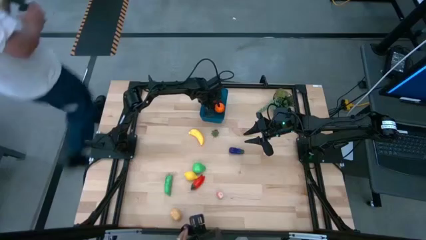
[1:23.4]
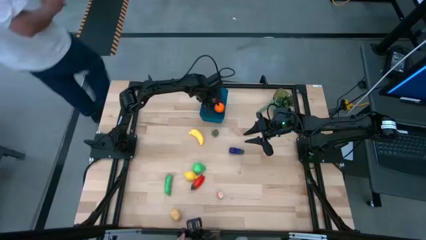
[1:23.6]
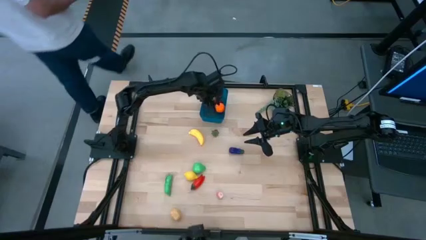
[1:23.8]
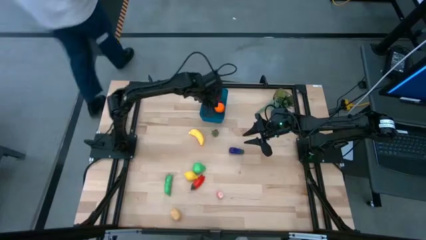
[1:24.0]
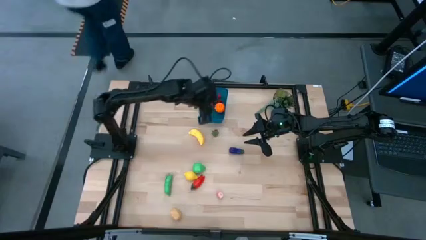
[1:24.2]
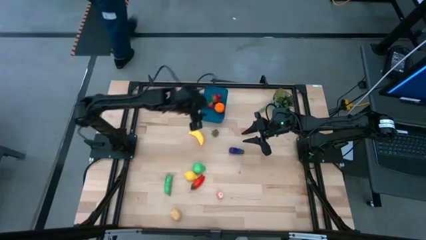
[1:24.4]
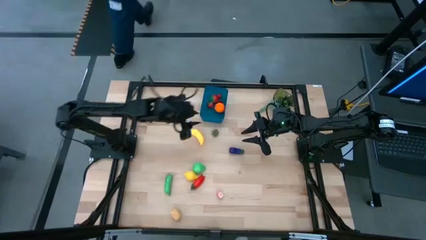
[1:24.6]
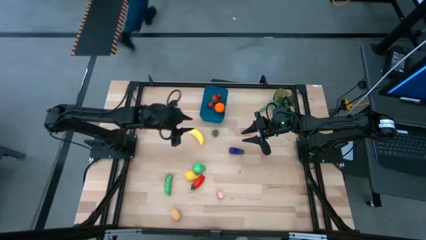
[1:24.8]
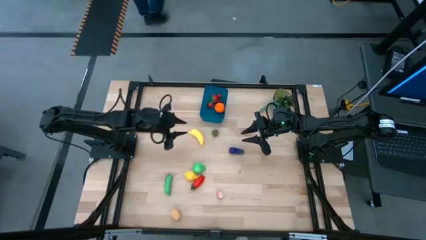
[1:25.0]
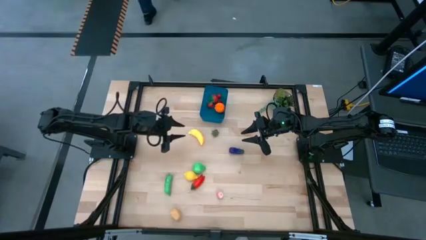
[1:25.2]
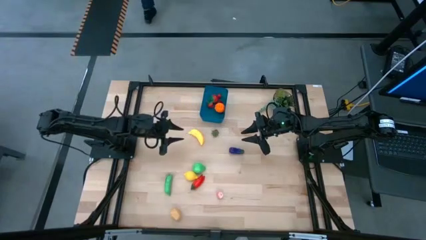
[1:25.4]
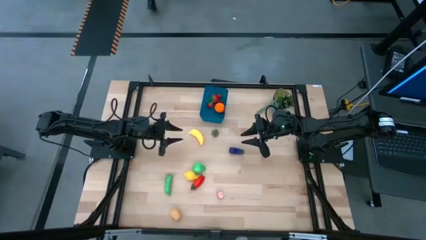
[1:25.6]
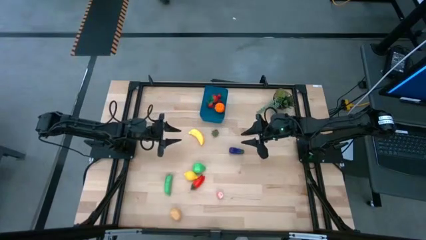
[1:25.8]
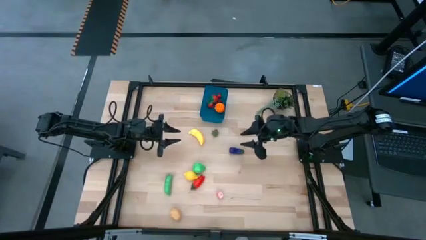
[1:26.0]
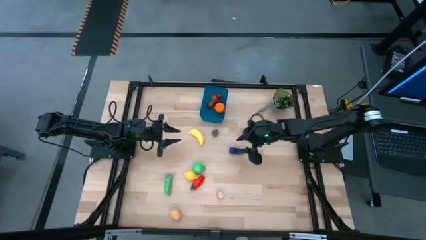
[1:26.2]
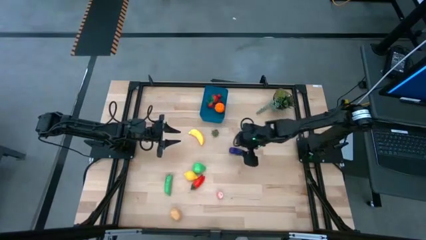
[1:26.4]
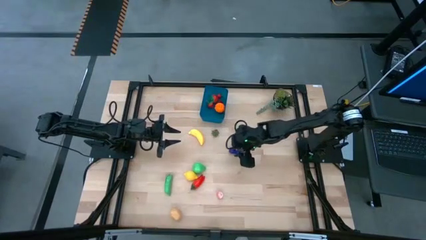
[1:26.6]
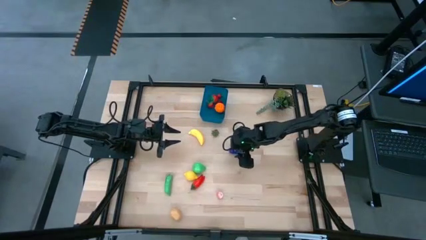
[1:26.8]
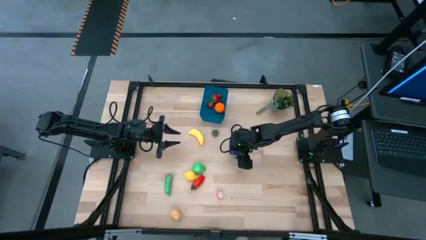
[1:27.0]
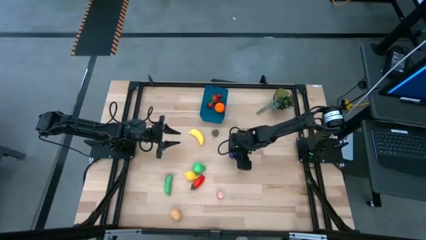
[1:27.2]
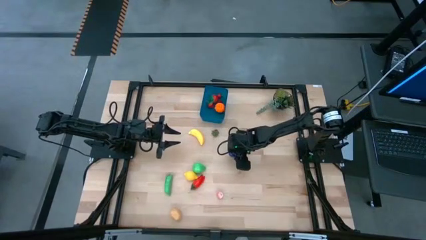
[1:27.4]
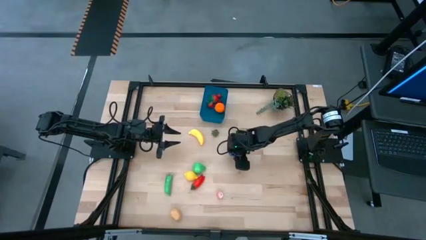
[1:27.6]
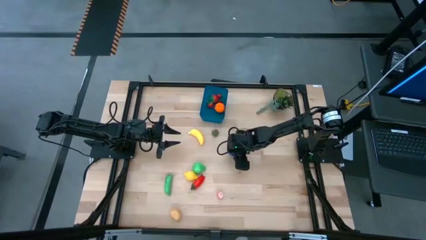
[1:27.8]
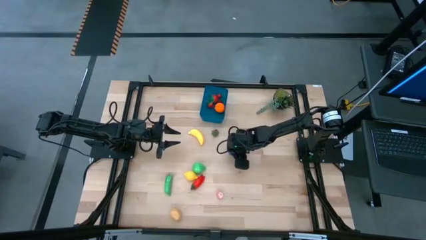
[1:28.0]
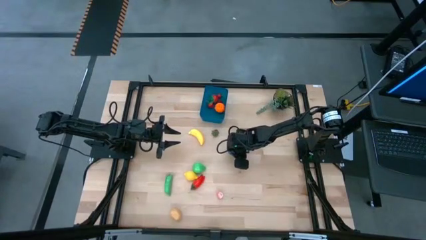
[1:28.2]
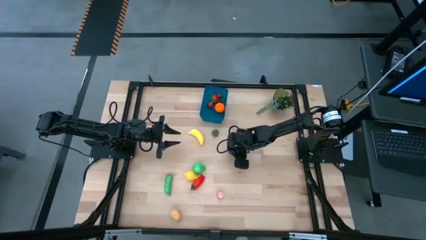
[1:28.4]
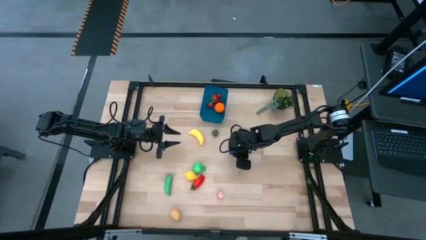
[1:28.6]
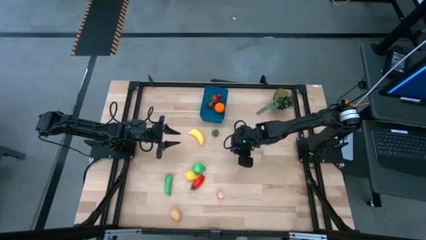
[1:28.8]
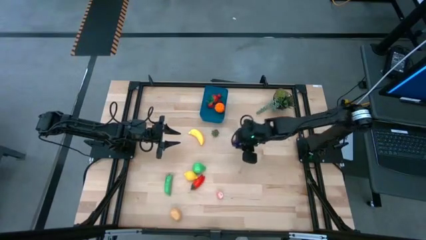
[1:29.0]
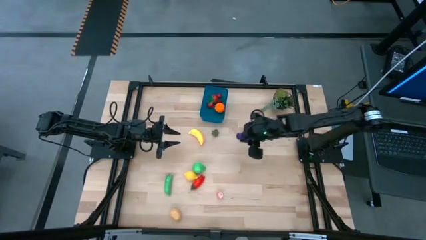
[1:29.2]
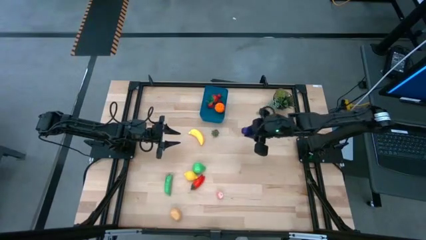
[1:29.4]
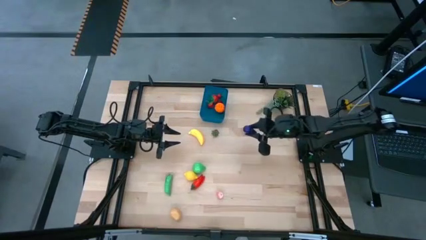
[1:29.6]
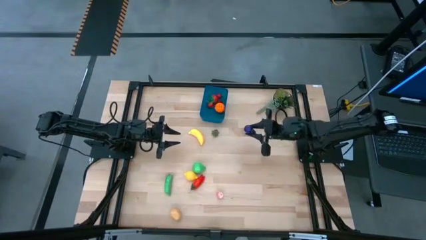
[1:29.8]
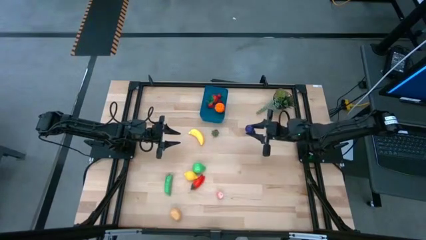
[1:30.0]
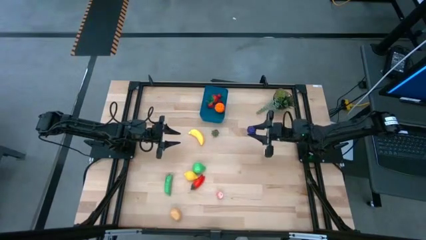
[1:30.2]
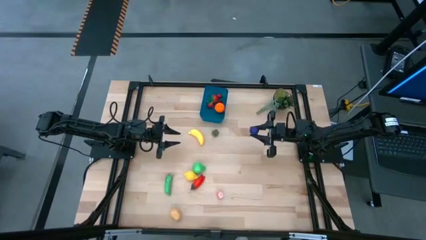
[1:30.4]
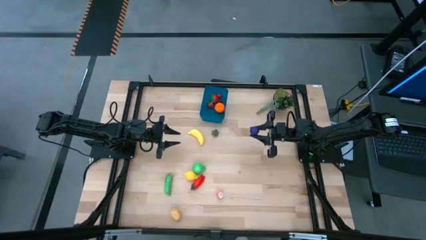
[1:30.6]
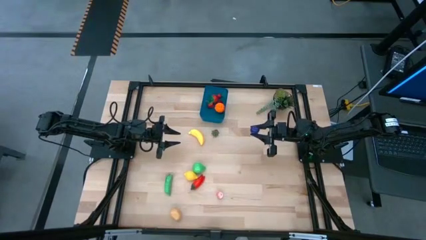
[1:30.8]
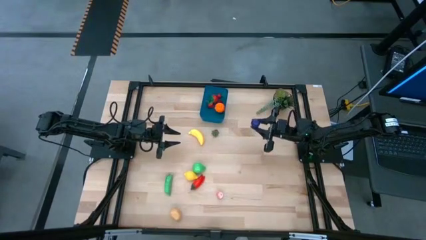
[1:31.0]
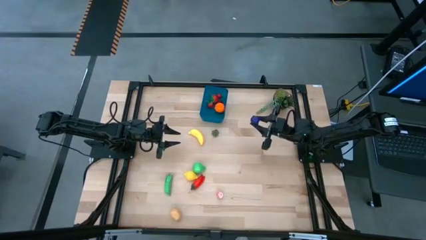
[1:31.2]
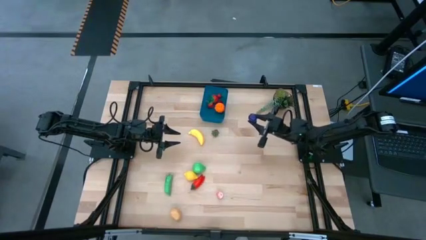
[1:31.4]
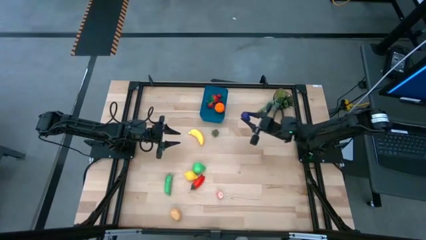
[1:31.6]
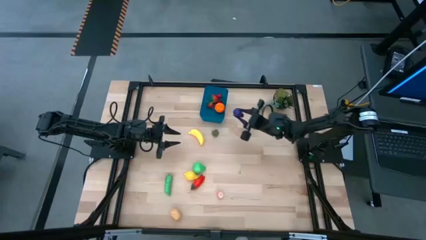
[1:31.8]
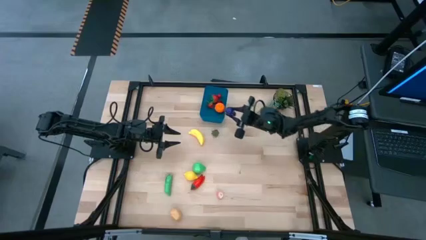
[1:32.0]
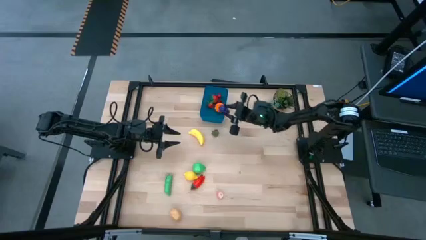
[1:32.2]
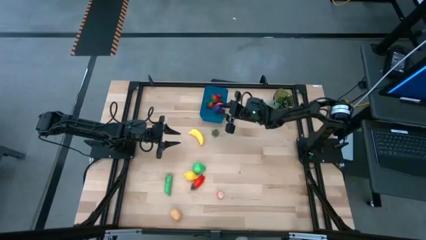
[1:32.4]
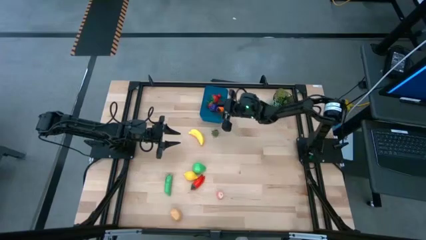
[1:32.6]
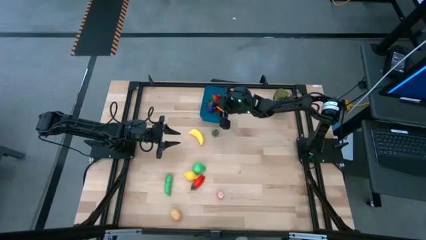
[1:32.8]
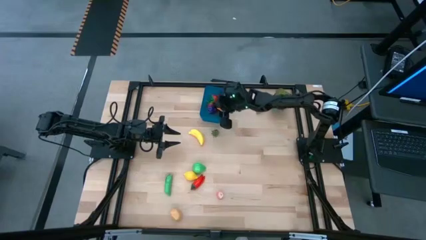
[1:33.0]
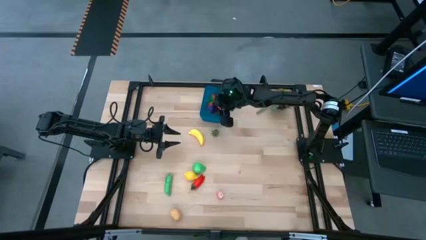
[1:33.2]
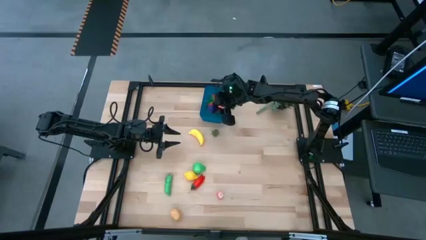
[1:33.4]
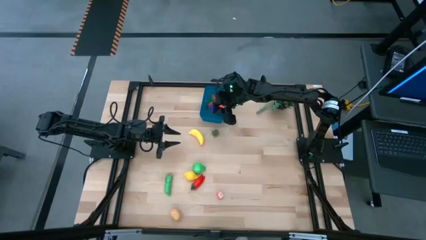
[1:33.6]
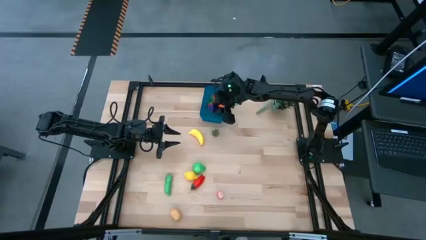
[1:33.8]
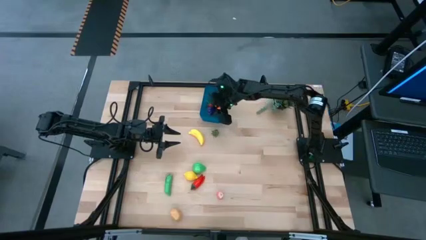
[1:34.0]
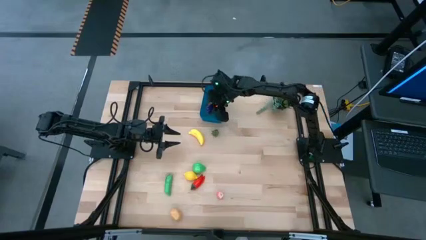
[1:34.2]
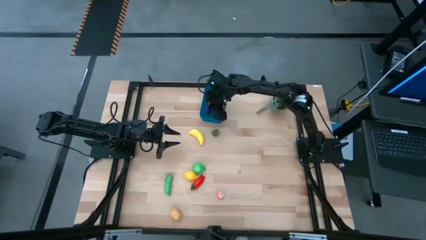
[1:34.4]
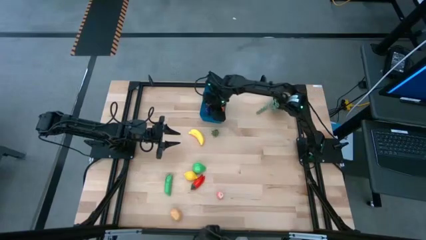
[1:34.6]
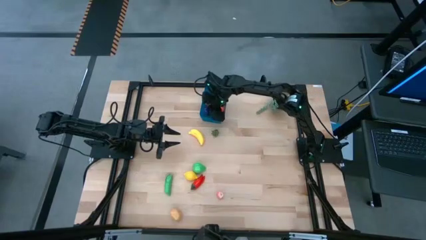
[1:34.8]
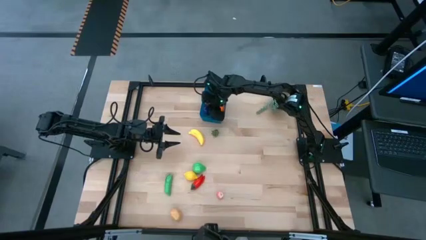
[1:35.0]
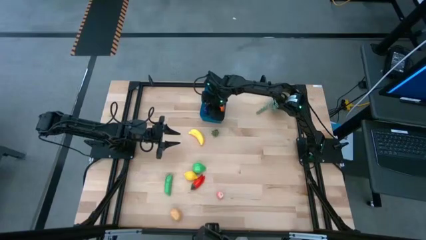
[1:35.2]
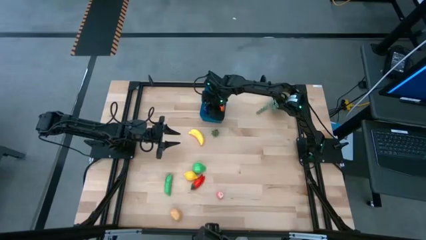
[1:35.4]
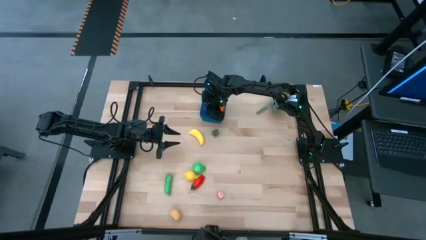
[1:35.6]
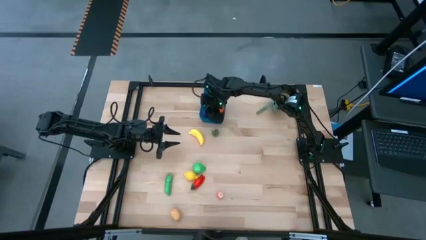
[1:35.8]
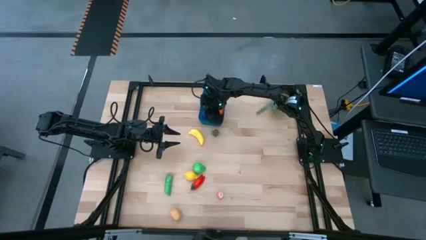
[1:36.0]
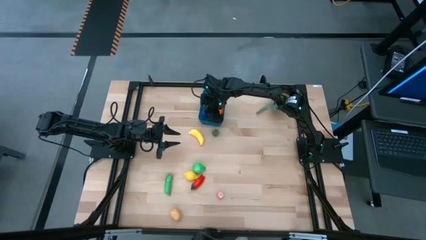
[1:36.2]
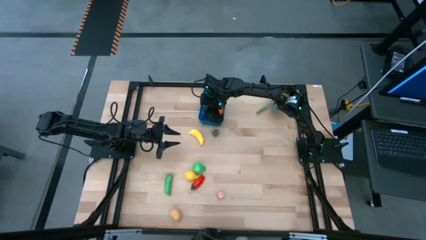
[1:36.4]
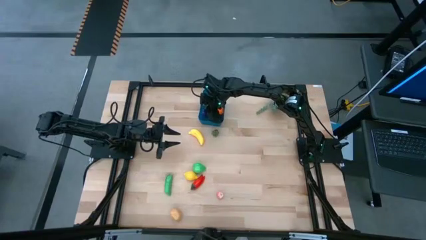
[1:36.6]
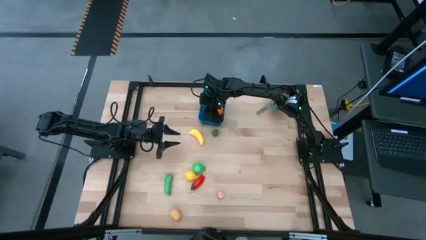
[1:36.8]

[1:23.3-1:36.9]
Task: Pick and placing Produce into tupperware
Put the eggplant into the blue bin

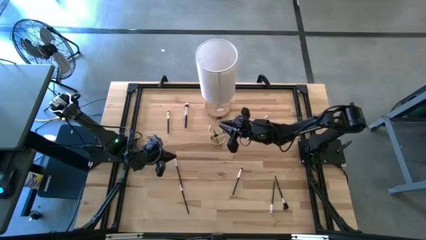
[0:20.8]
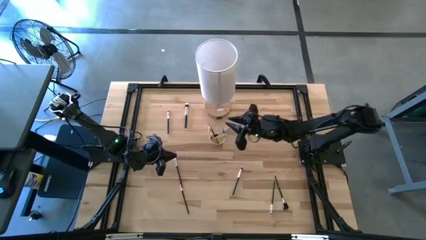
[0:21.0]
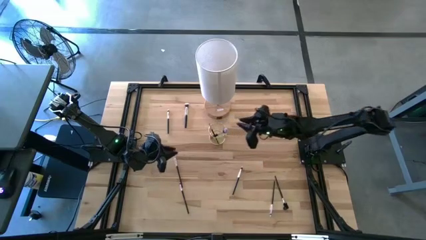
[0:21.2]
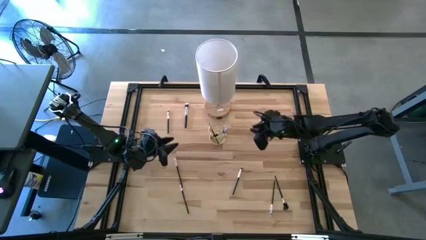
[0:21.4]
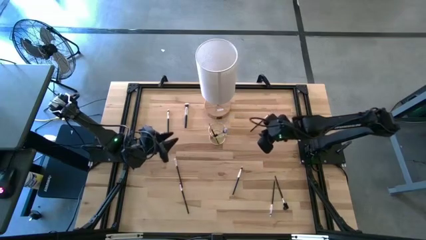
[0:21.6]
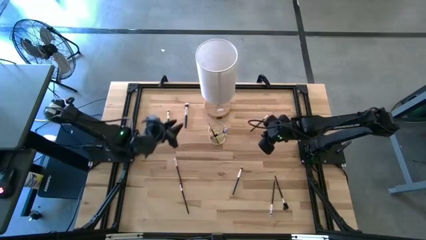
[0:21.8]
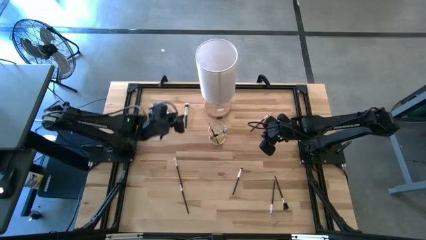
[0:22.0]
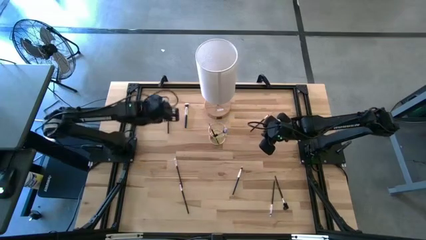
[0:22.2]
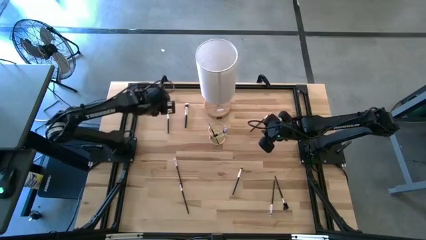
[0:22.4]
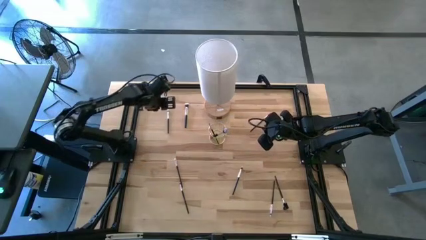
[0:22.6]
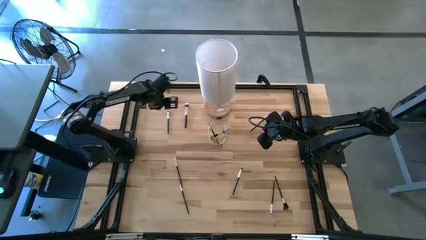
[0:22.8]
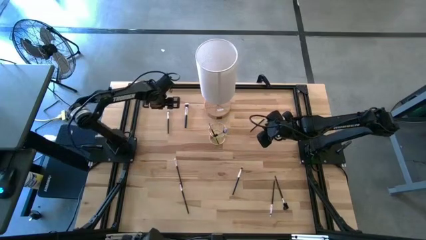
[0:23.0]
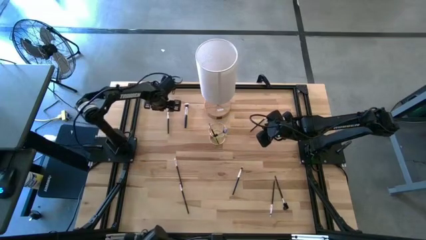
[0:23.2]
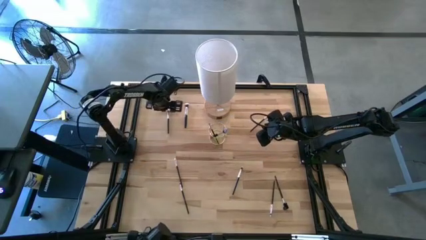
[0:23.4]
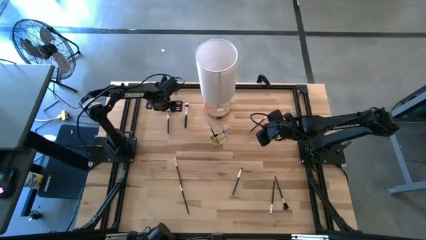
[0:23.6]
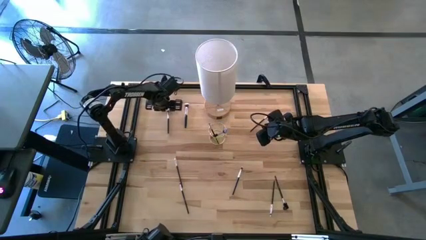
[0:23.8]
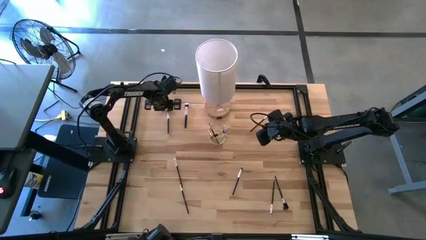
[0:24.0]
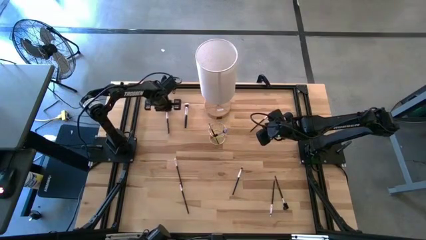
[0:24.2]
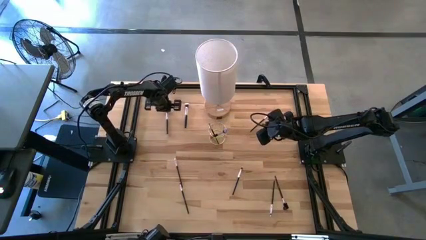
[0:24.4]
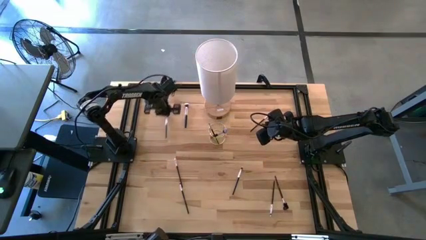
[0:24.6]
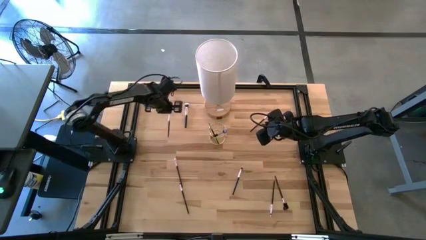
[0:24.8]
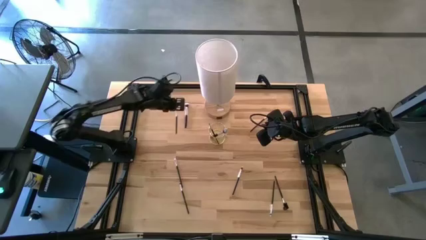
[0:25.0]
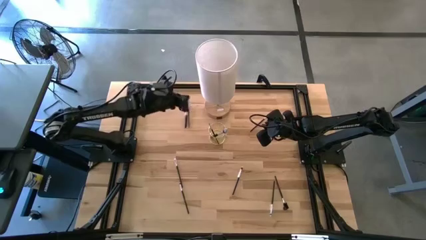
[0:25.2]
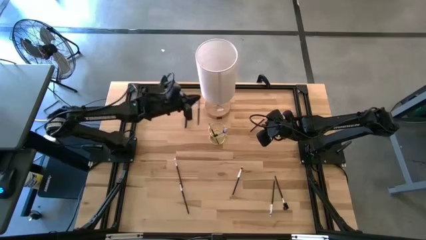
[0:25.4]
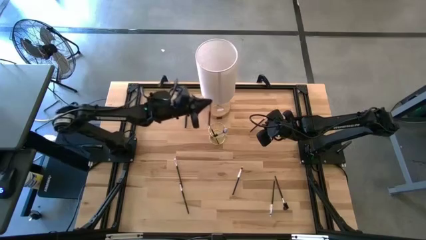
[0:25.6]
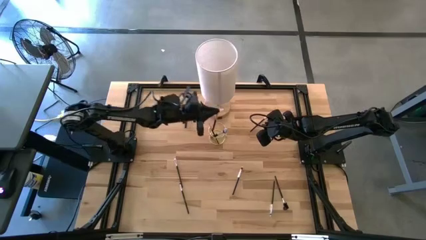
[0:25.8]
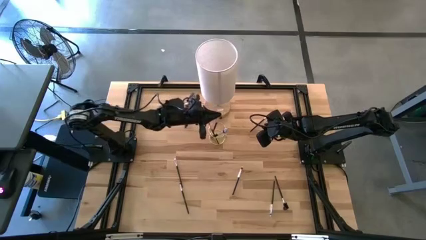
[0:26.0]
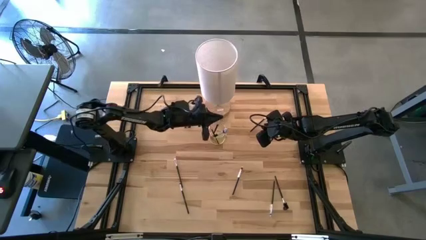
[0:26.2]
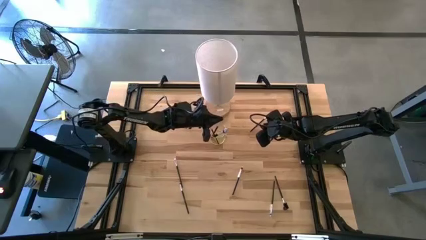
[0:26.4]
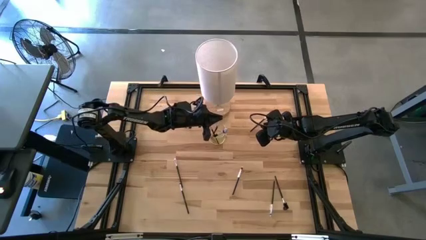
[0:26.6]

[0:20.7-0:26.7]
Task: Put items in baskets/containers
Put the black eyeshadow brush into the gold pen organizer
